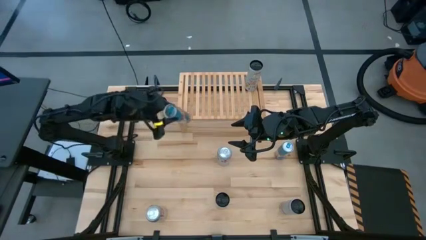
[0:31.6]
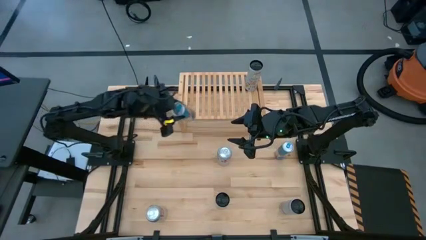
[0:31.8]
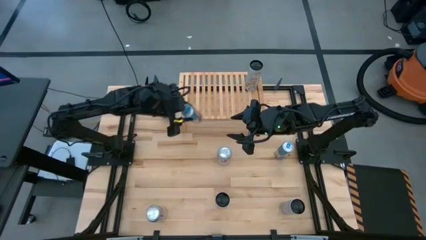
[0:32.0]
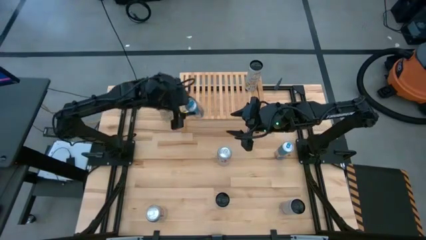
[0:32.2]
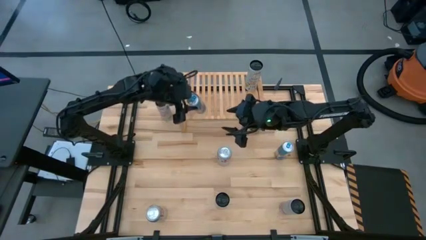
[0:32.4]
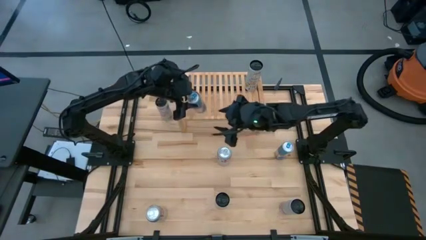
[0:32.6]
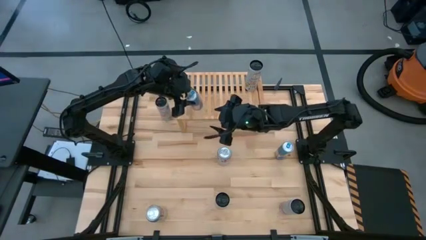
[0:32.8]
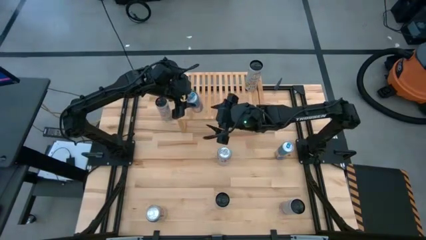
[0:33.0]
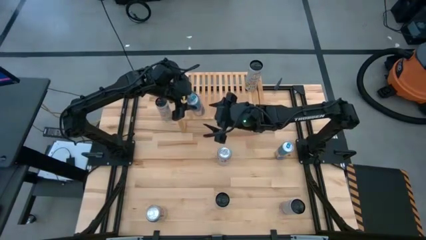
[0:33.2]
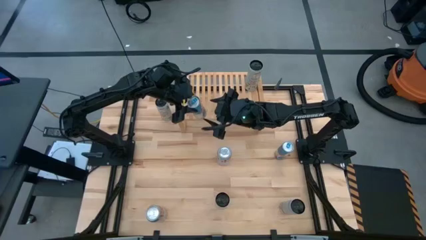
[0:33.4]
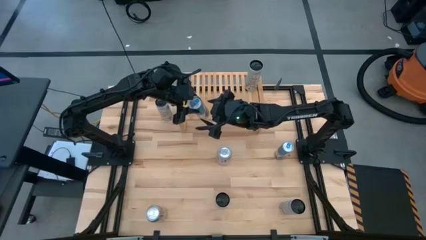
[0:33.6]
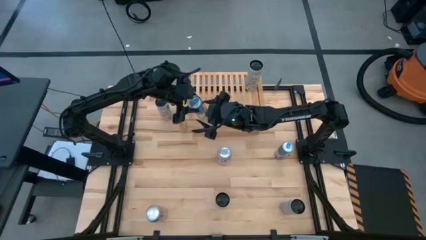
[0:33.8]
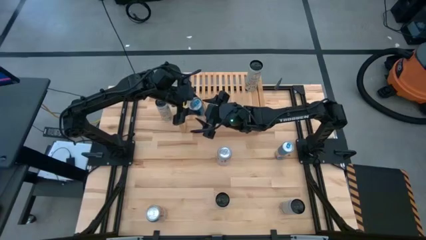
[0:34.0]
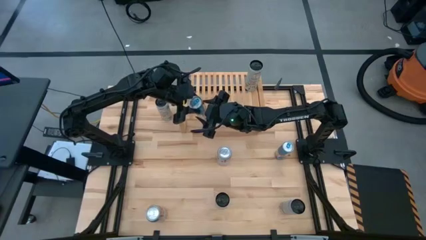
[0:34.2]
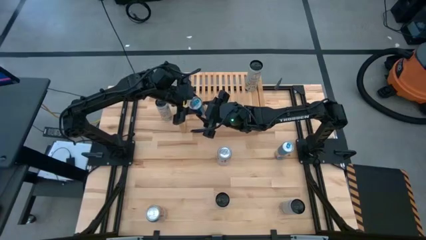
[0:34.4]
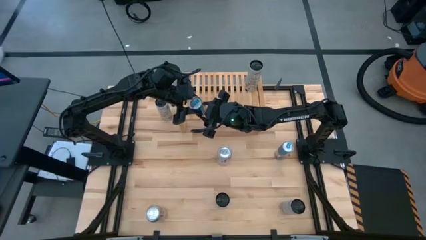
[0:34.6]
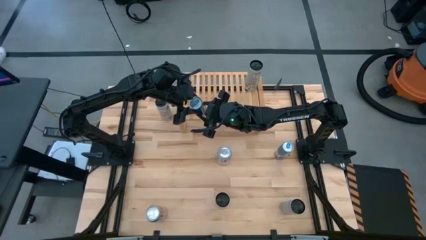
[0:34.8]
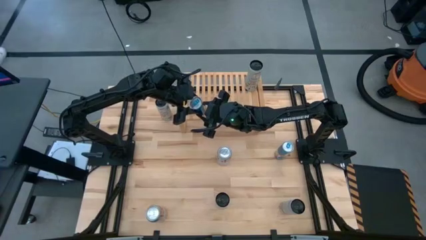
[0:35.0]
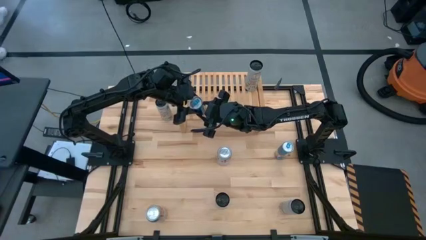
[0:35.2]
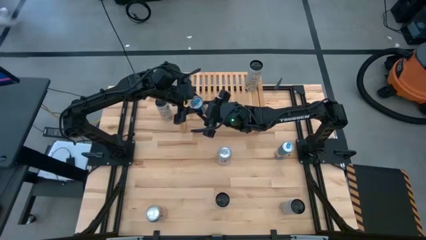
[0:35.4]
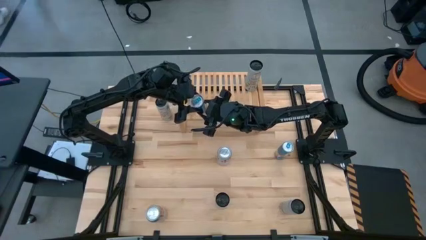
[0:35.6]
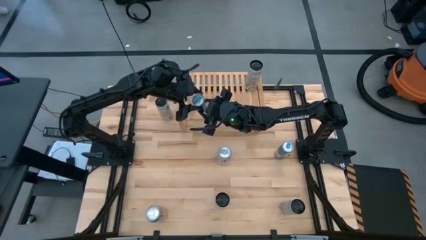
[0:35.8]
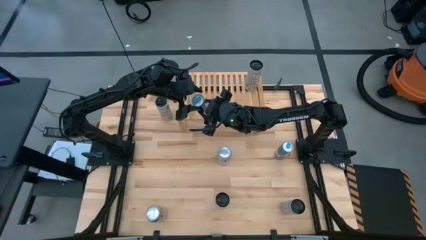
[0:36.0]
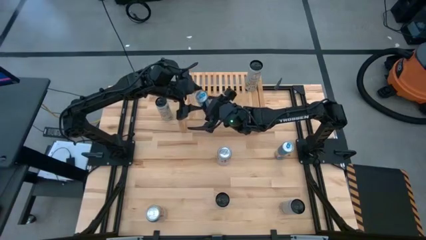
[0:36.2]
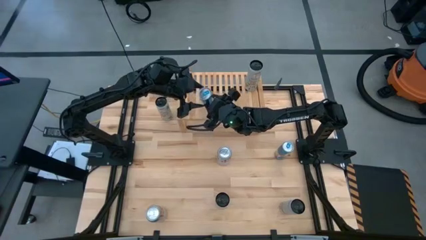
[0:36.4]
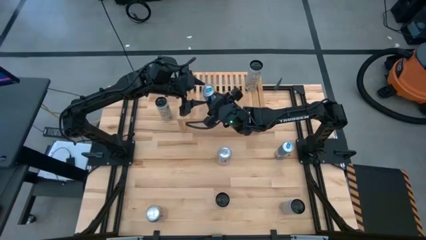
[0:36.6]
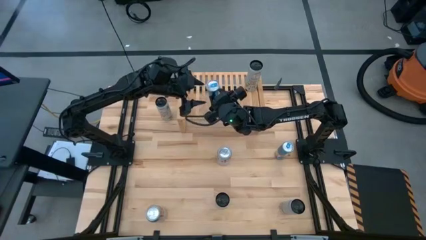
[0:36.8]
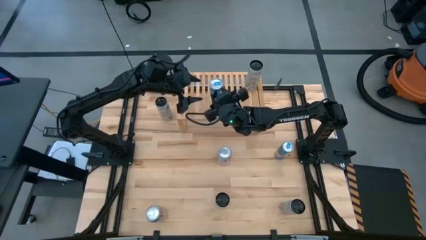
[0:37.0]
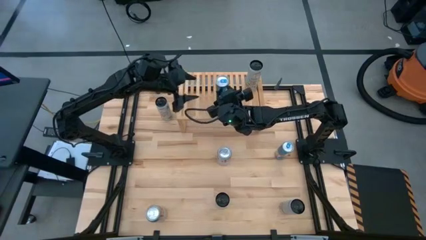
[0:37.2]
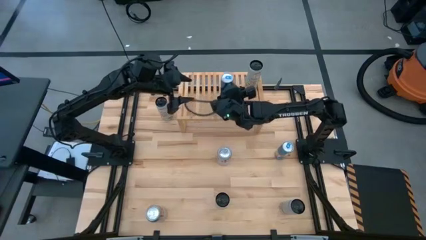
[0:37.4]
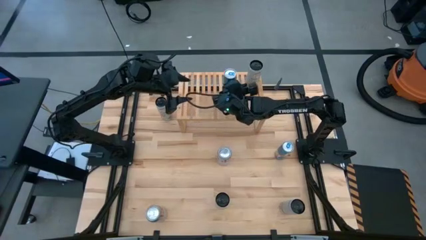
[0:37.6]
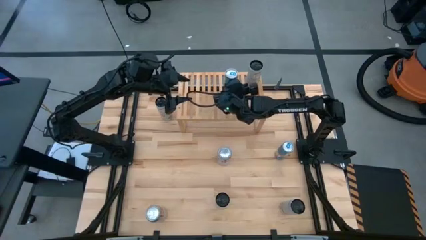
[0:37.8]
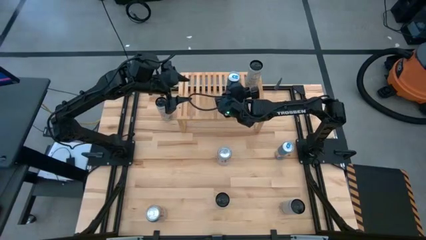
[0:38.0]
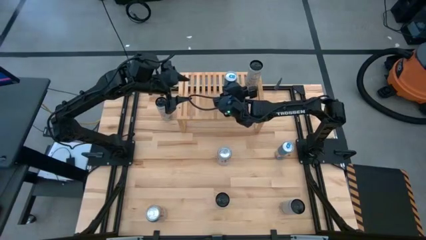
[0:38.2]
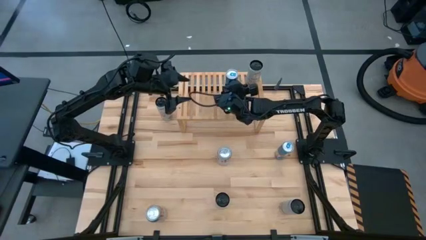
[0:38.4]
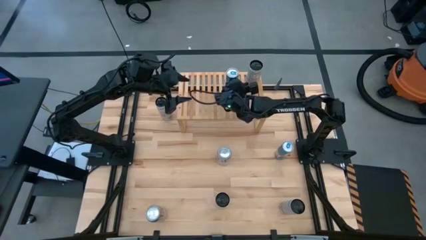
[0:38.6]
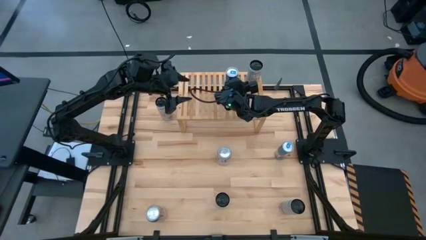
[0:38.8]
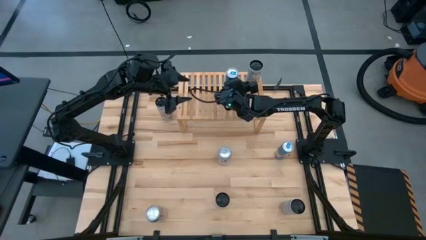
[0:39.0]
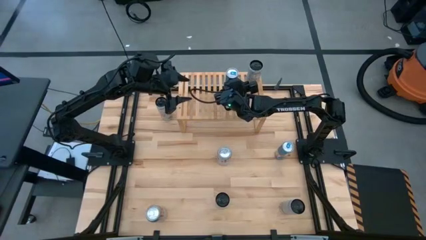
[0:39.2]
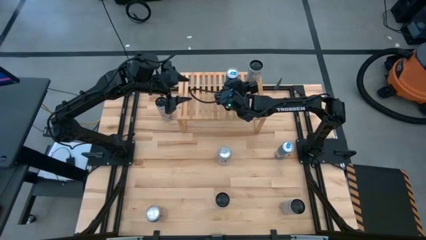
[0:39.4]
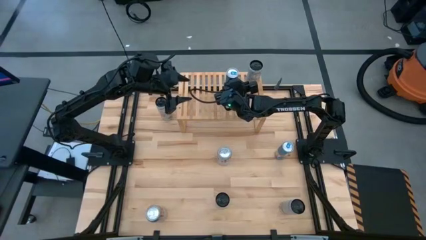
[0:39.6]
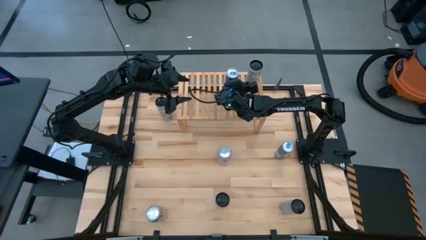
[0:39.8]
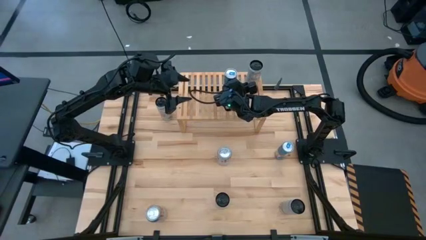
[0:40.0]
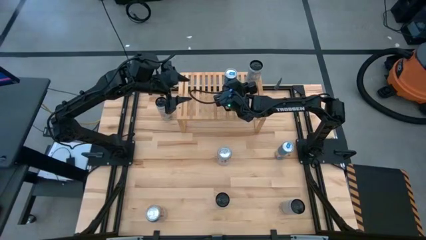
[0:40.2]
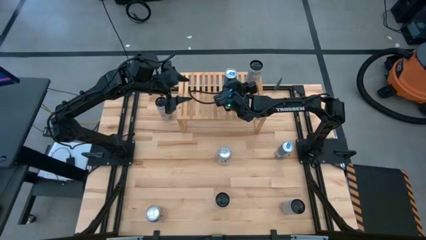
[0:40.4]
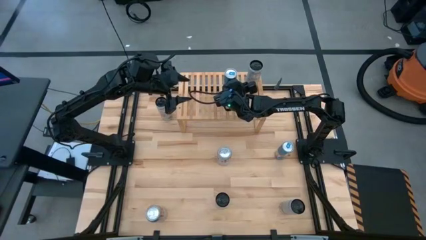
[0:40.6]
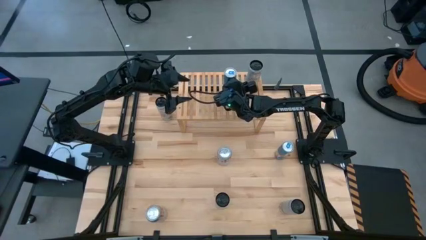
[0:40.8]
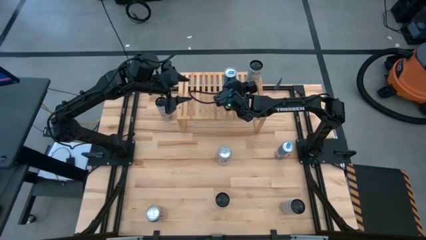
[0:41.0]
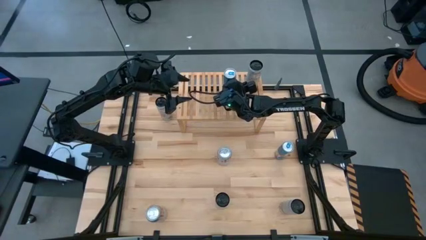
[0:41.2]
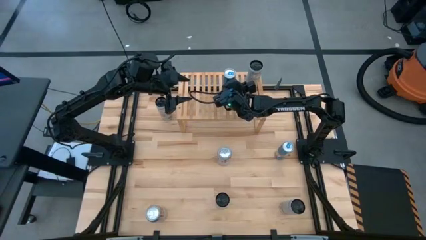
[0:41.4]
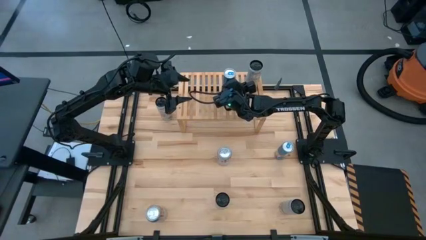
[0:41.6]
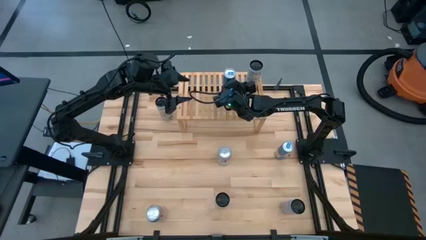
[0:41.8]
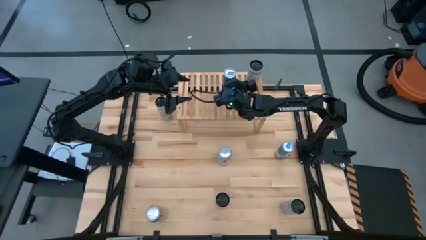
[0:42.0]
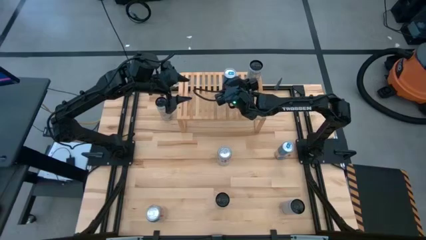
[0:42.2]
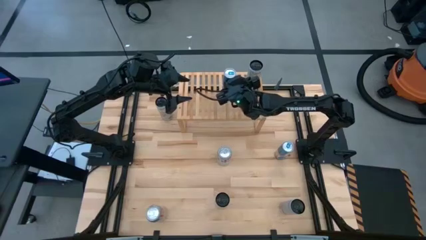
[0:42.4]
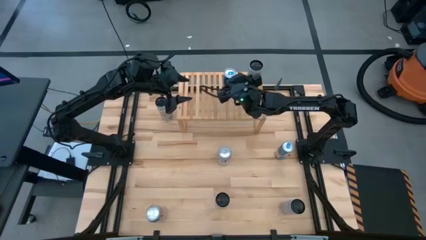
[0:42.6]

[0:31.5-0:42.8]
Task: Place canned beverage on shelf
Put the left blue soda can on the shelf
